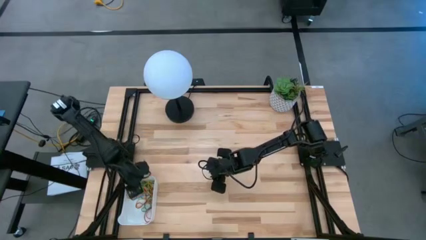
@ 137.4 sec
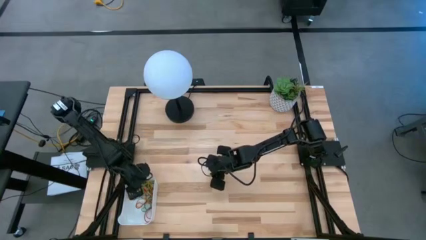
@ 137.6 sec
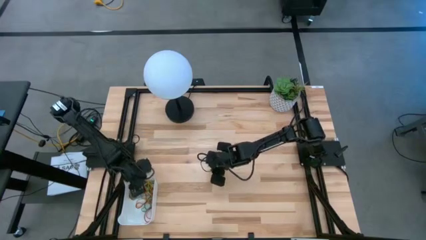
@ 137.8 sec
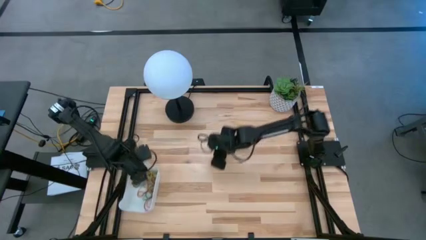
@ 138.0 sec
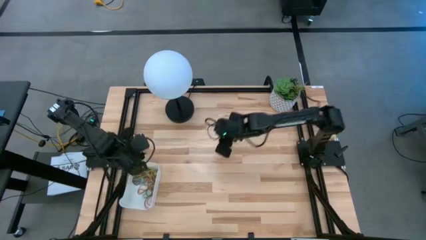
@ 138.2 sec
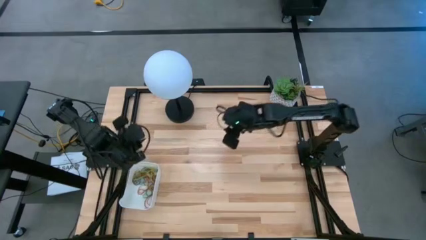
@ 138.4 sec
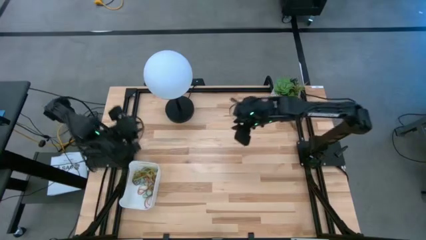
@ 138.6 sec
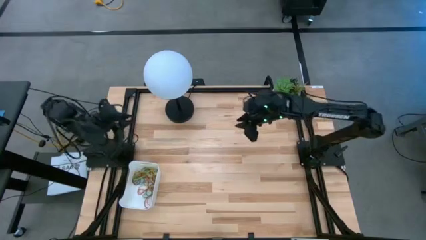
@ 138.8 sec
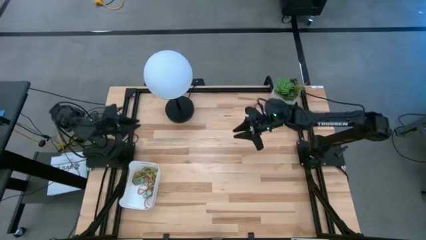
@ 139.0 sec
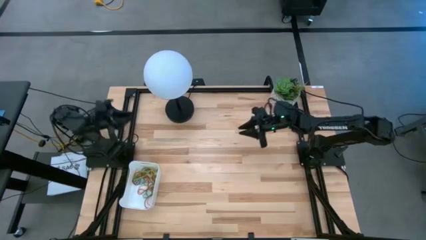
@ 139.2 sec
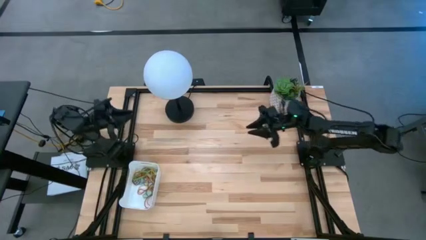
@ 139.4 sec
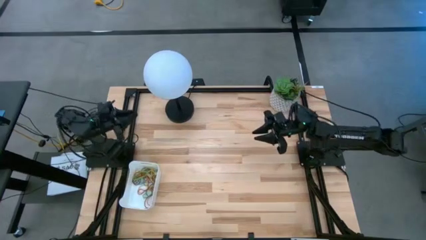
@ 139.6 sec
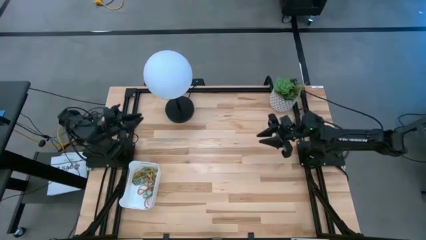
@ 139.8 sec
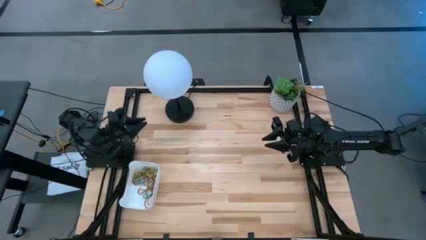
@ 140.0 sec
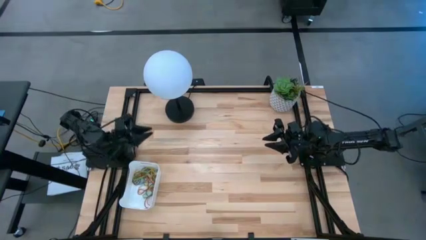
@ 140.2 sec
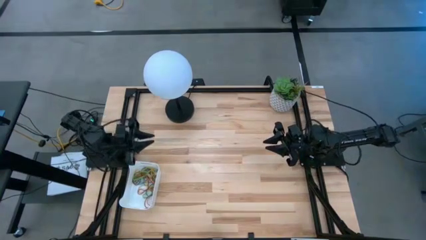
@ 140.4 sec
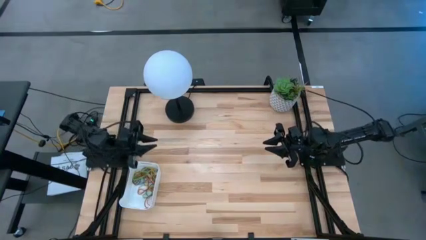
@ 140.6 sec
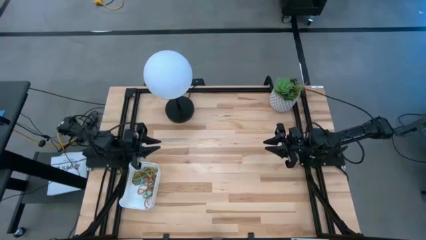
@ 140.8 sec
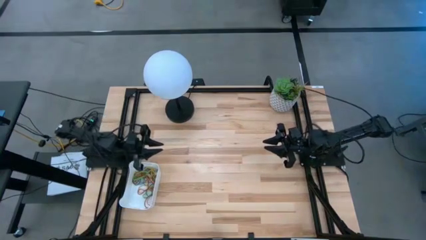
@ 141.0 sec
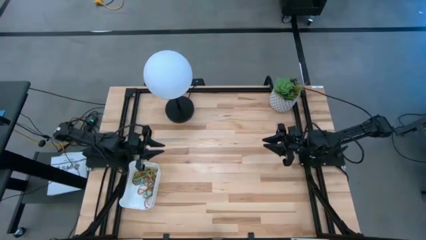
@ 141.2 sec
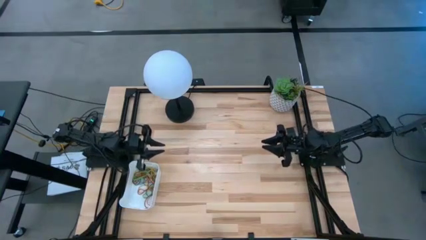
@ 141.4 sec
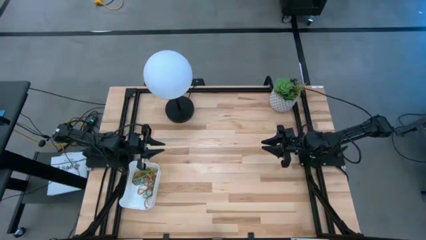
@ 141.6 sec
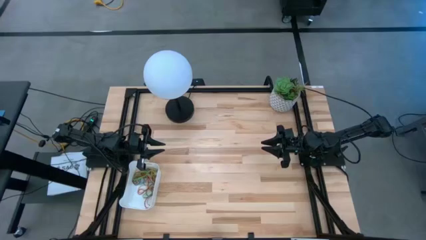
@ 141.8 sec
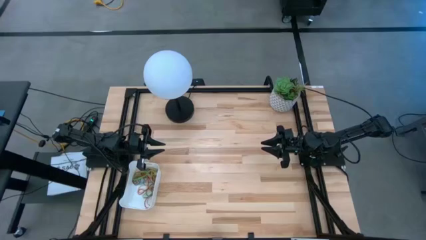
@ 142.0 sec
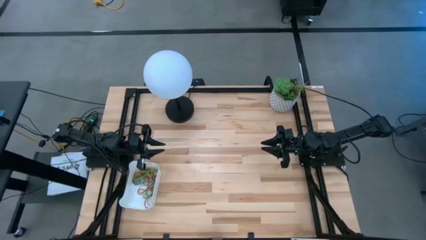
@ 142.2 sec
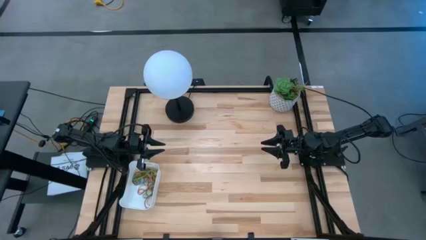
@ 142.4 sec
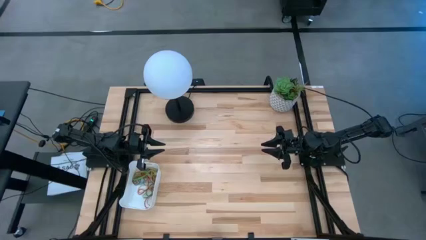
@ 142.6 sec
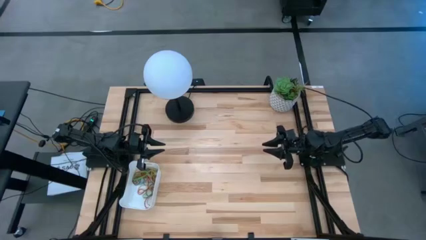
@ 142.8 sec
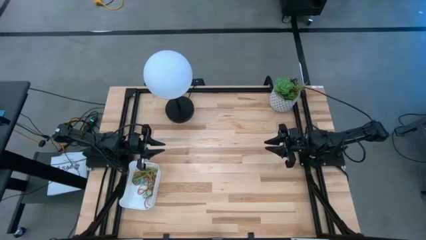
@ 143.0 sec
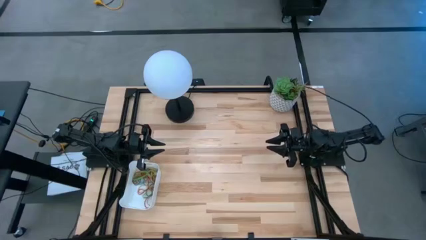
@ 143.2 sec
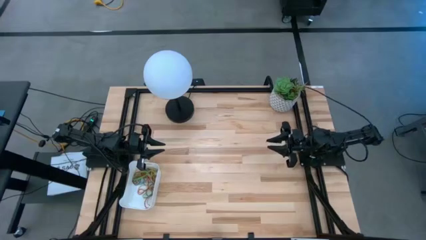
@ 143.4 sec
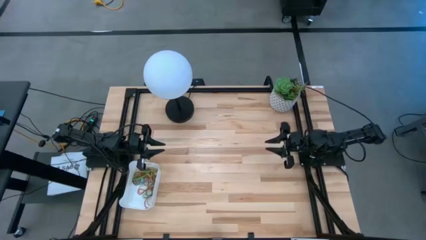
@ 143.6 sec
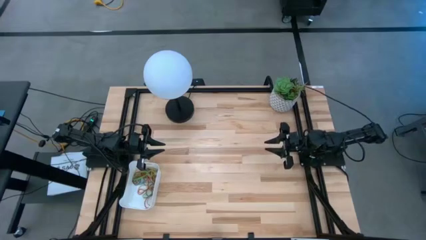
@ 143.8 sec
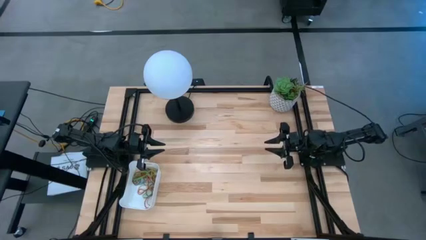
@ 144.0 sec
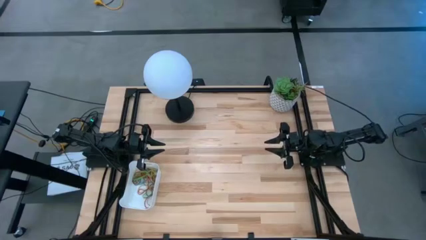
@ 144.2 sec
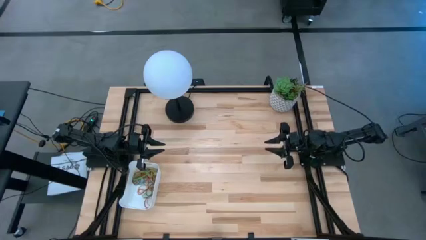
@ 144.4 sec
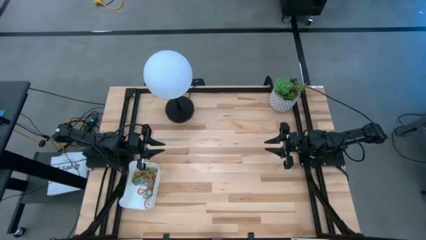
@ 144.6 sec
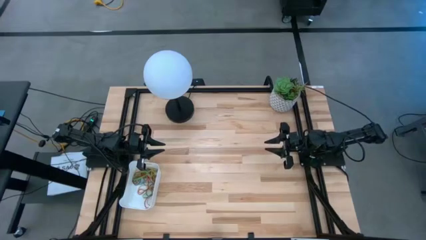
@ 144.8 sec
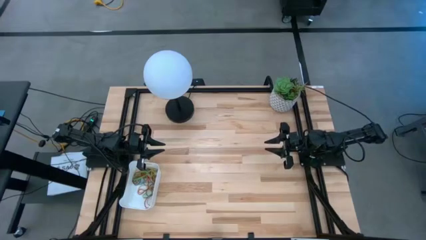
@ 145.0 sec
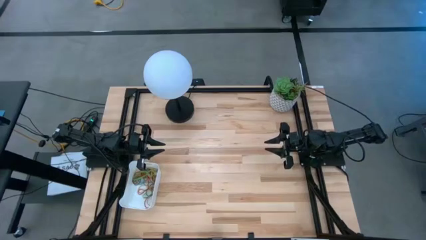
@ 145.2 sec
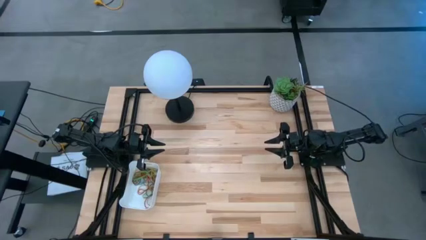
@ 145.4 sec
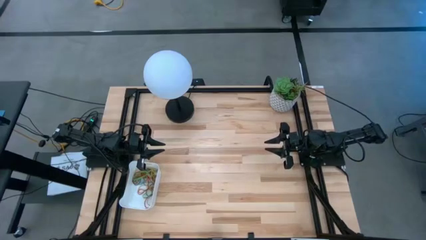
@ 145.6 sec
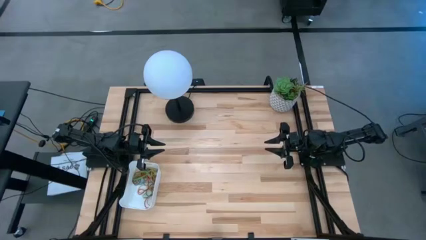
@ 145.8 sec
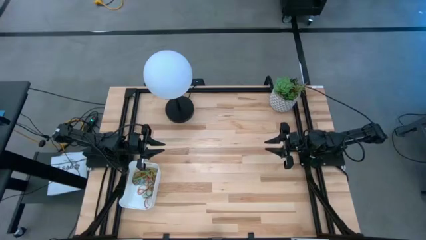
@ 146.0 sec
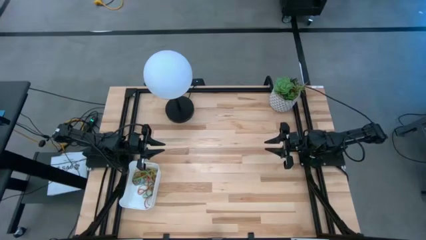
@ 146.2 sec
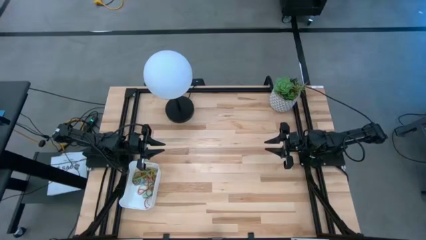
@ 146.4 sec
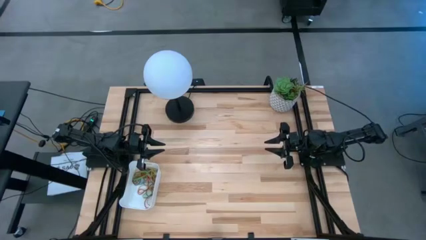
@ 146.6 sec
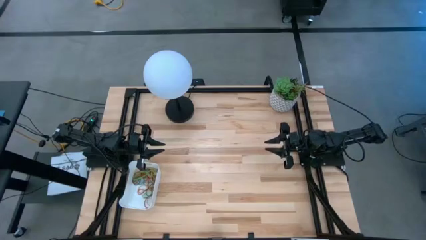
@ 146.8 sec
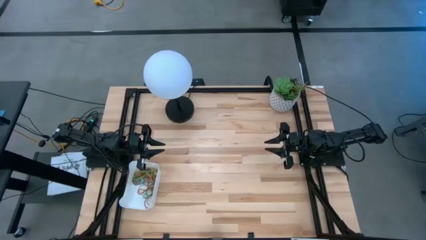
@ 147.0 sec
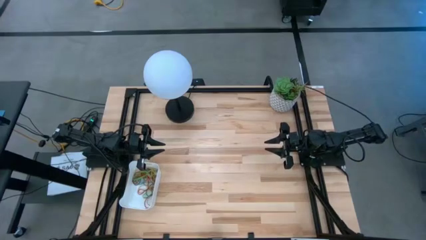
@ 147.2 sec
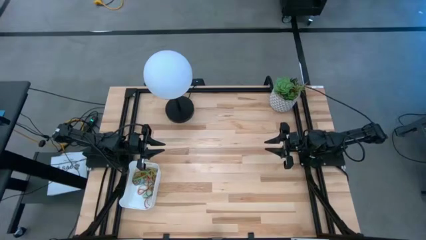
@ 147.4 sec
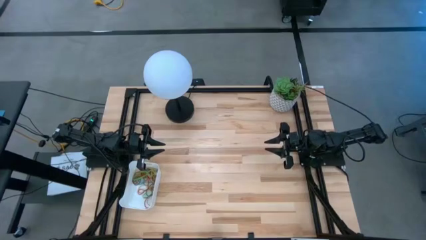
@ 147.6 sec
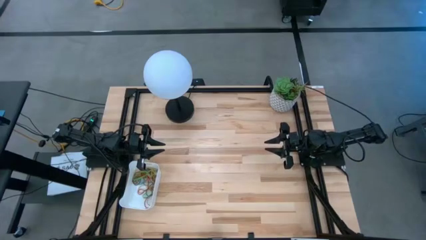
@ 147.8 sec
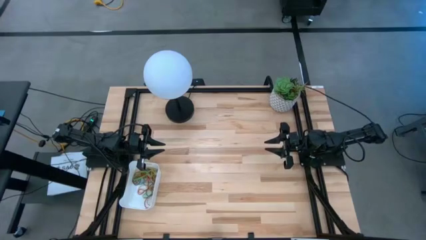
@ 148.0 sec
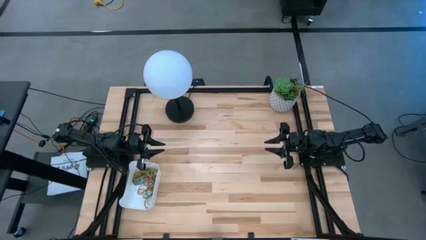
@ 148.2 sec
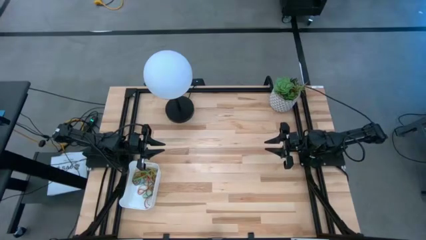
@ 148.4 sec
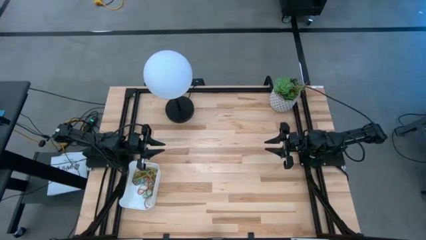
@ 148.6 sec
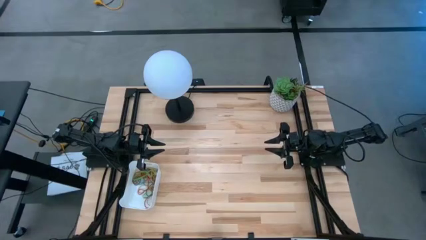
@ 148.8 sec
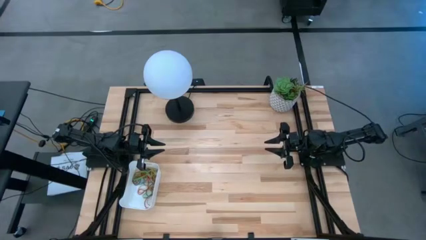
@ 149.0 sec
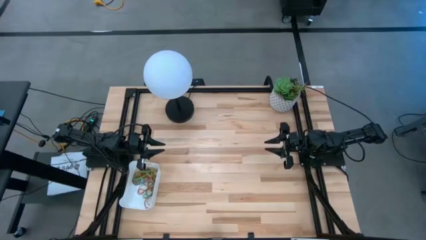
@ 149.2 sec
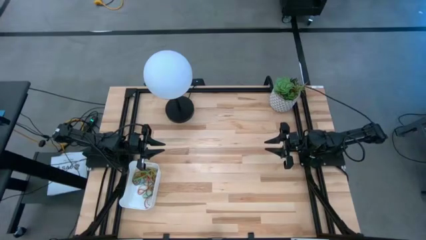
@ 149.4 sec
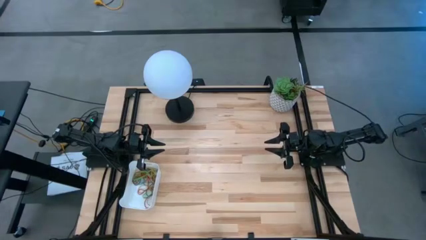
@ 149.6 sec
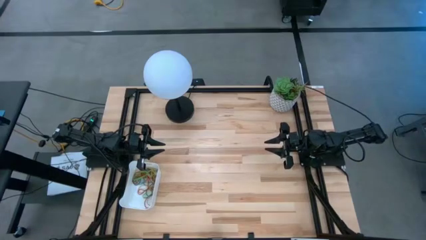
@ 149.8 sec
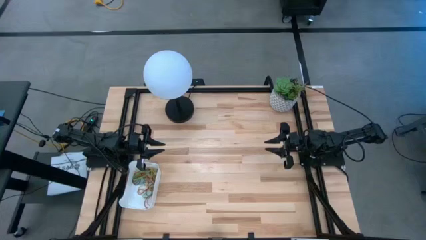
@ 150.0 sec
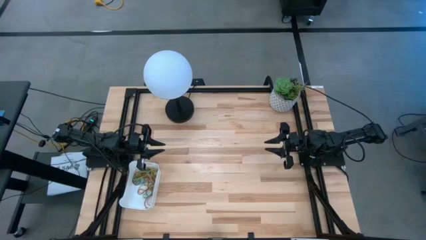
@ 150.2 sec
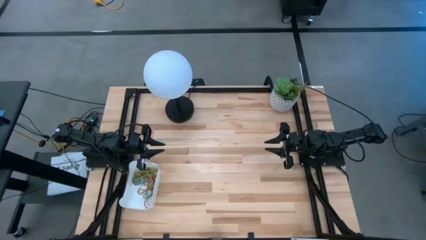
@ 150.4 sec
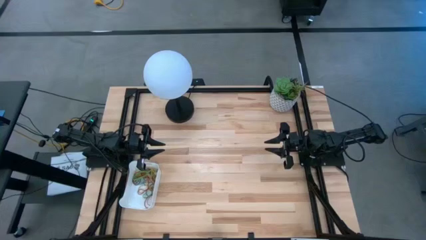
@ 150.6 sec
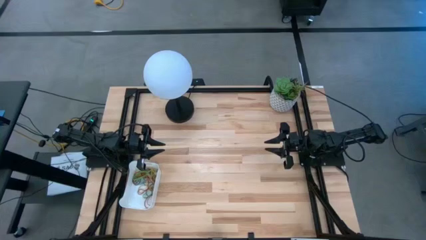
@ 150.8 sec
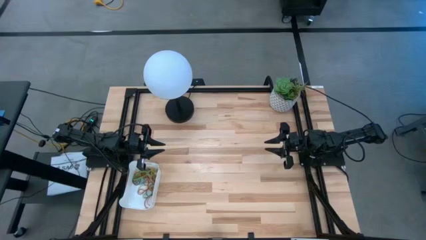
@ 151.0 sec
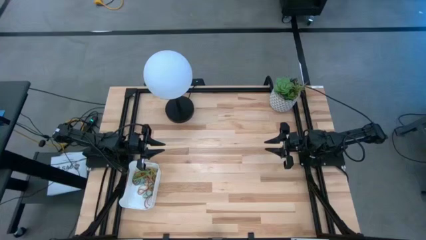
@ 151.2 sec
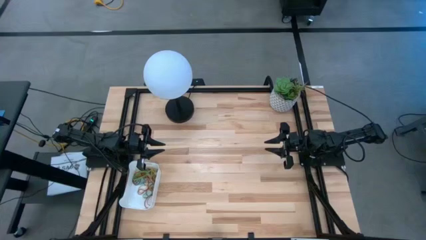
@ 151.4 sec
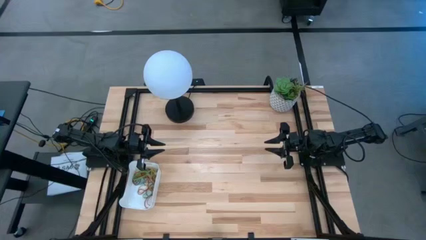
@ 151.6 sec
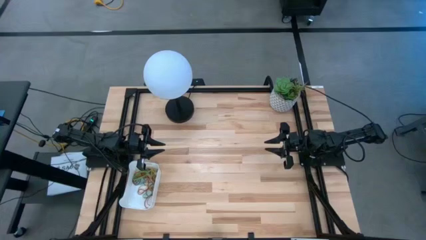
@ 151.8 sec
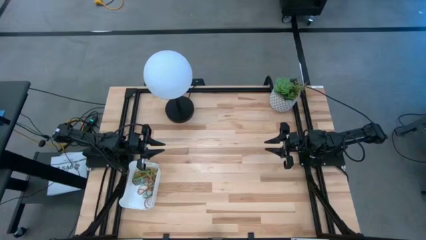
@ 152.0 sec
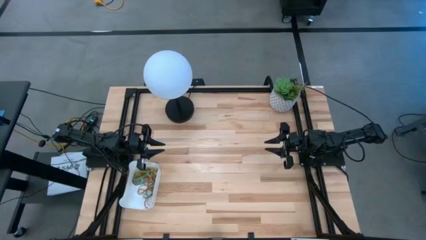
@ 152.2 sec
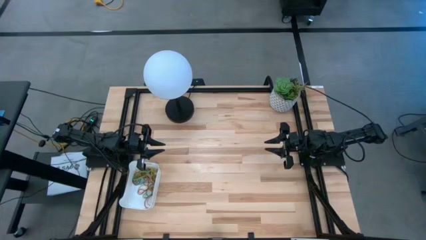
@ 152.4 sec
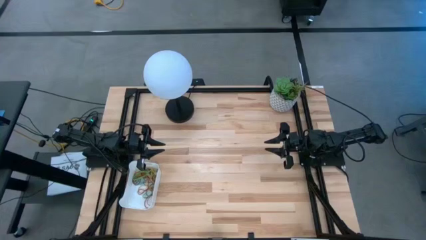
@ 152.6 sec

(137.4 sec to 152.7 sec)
Task: Pick and place items into bin
Return to Home Position
